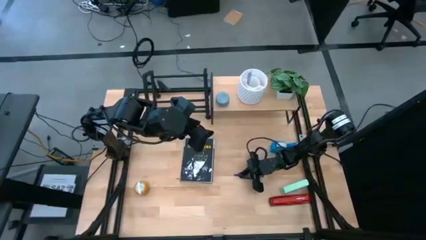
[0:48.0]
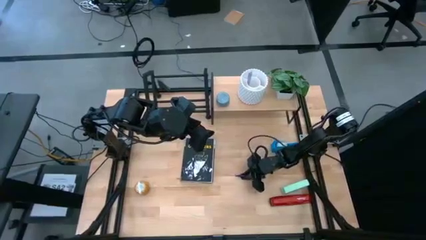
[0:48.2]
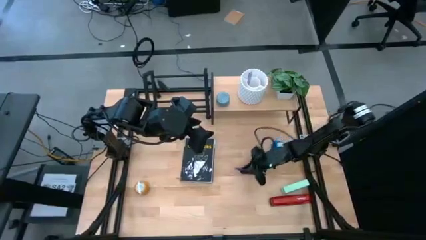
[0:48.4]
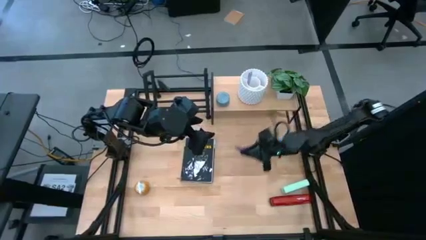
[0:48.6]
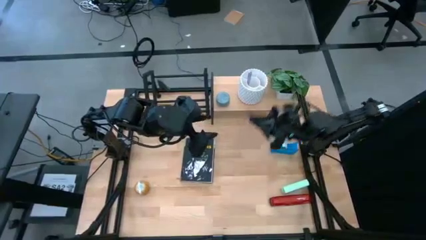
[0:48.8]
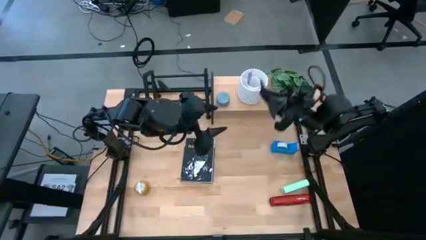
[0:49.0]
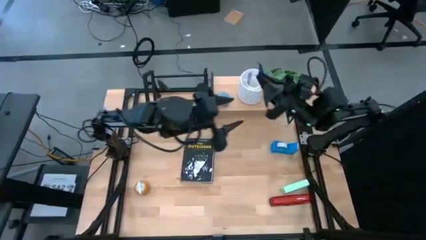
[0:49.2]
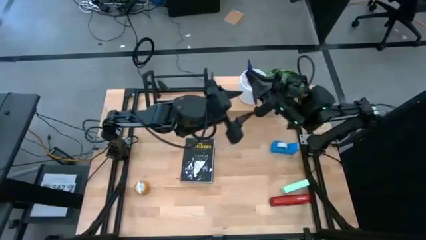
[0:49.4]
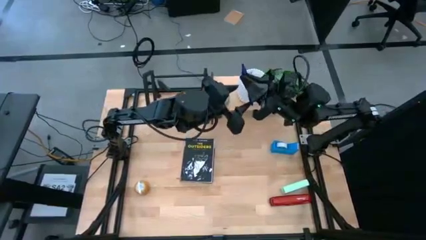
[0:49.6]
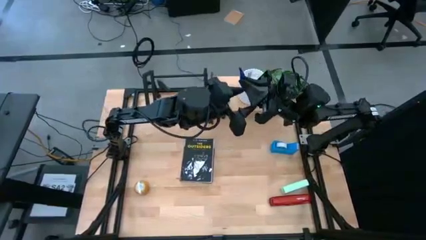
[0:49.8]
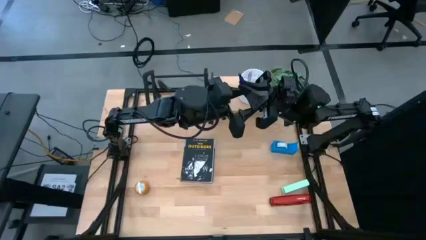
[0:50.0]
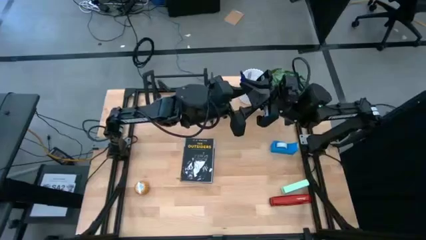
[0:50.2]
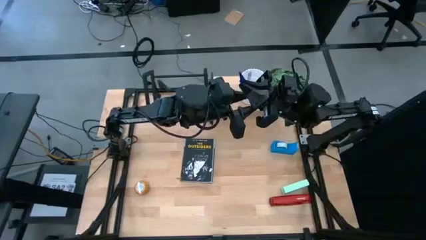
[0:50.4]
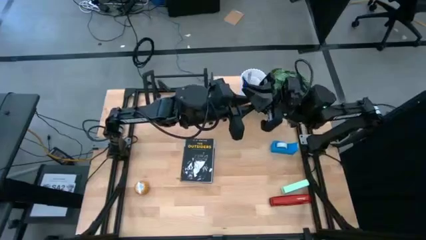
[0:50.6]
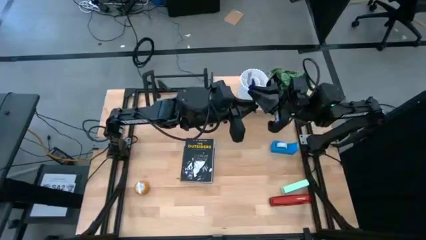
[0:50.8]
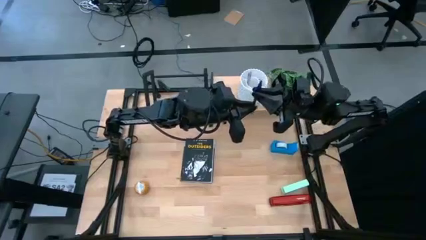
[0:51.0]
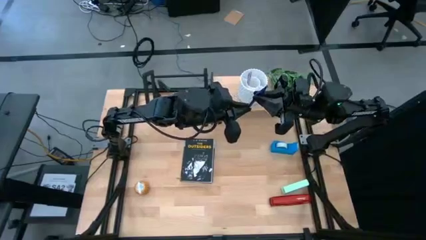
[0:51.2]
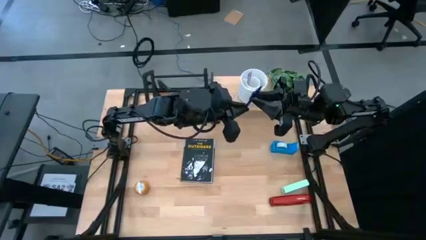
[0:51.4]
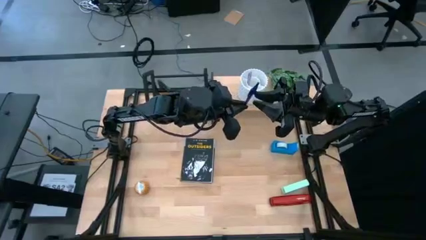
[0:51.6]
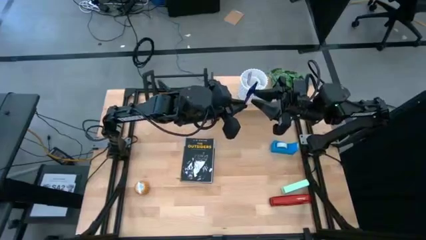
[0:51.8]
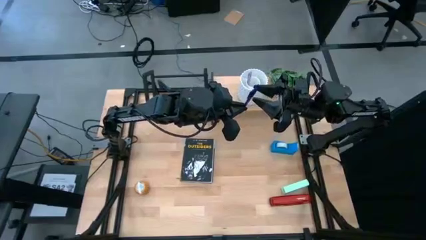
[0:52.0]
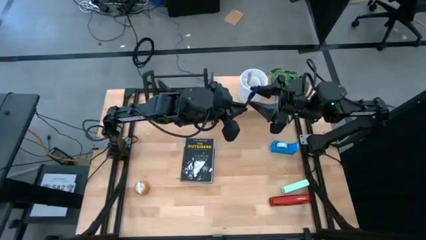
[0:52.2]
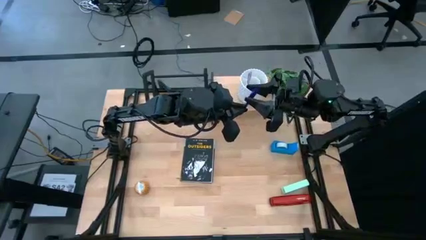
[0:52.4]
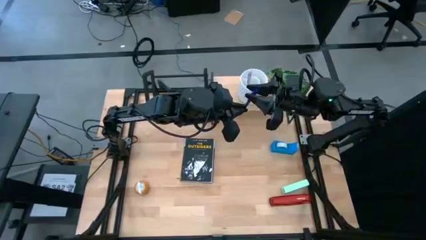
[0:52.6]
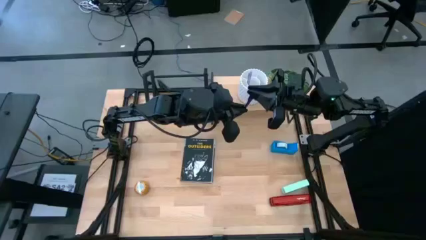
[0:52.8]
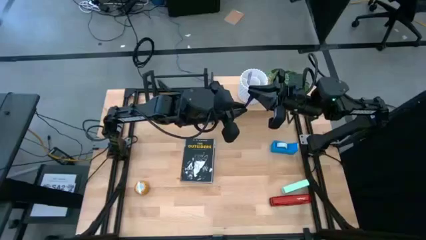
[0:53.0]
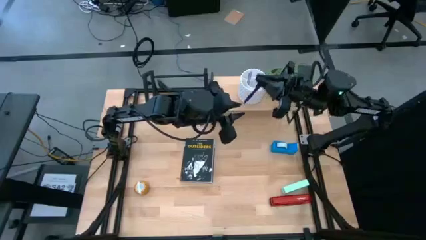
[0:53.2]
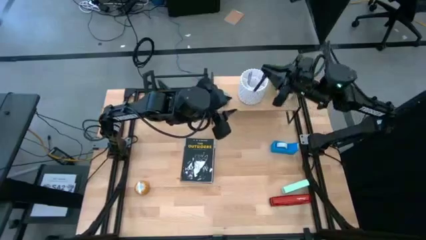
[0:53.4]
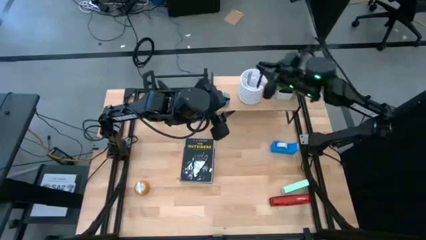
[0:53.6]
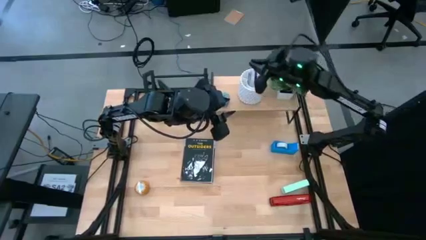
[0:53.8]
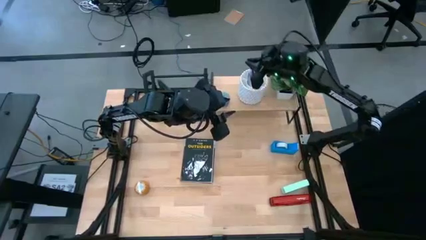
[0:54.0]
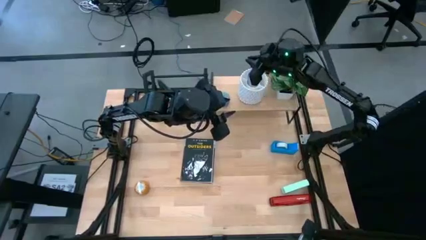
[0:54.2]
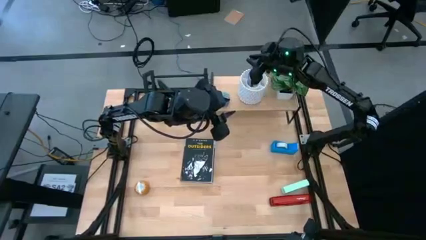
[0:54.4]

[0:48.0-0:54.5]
Task: Stock shelves
Put the violet pen into the white pen holder on the shelf

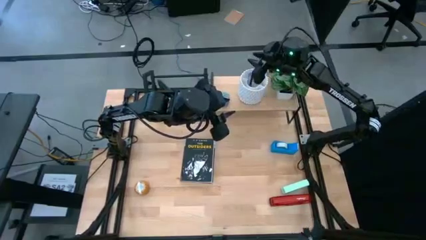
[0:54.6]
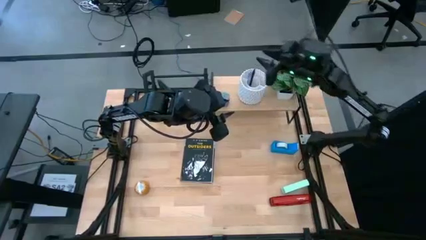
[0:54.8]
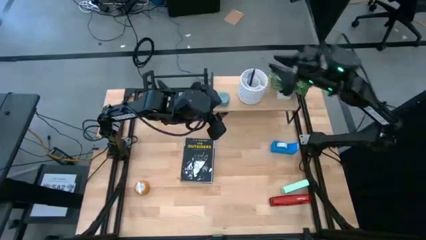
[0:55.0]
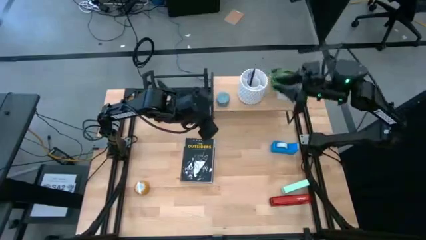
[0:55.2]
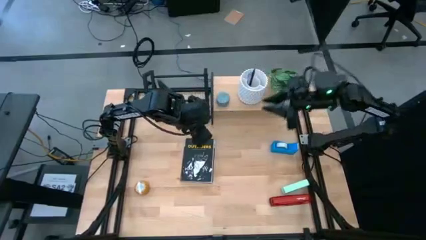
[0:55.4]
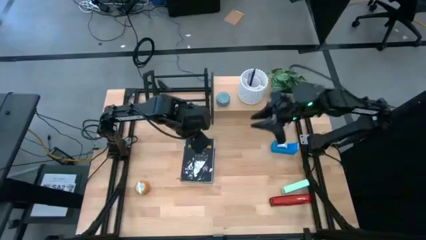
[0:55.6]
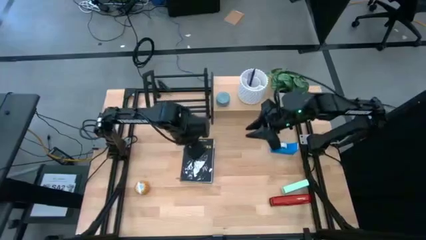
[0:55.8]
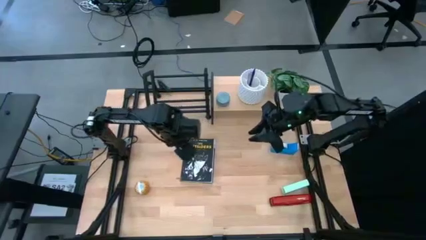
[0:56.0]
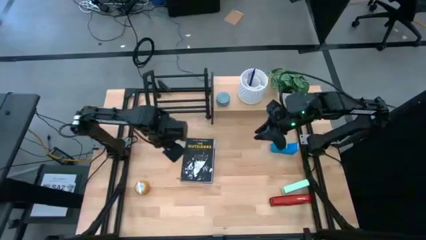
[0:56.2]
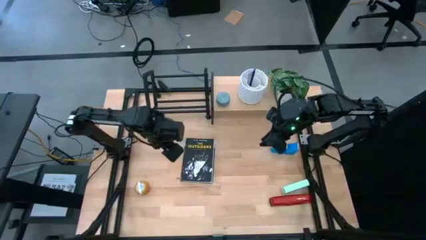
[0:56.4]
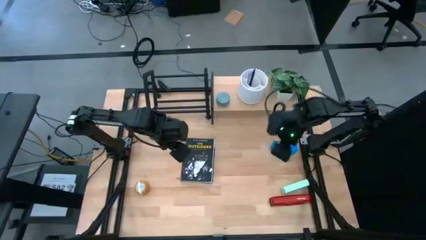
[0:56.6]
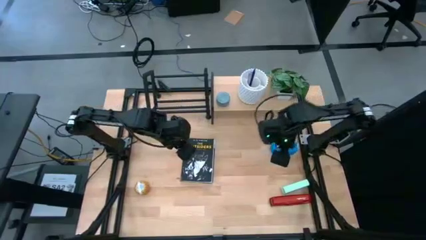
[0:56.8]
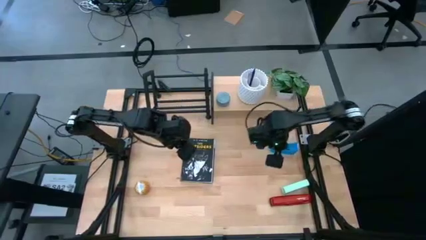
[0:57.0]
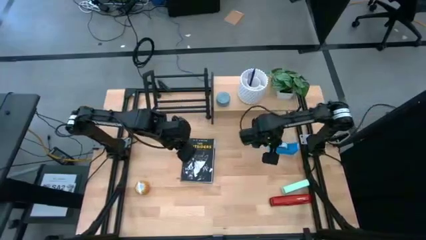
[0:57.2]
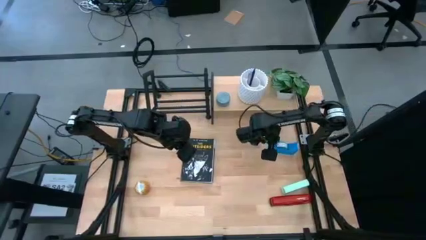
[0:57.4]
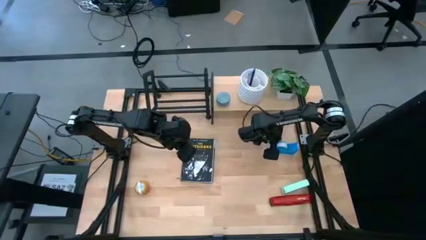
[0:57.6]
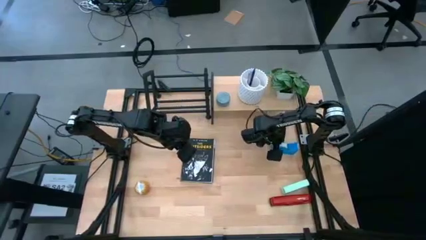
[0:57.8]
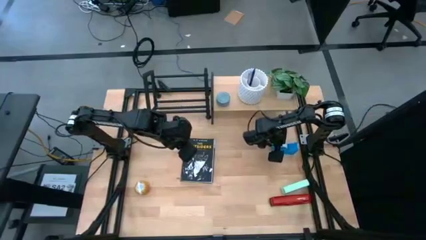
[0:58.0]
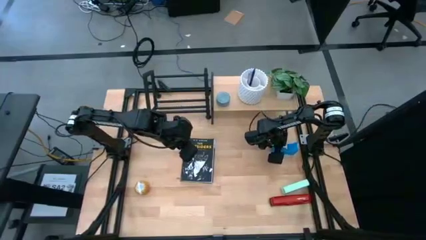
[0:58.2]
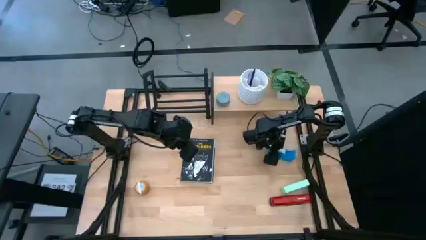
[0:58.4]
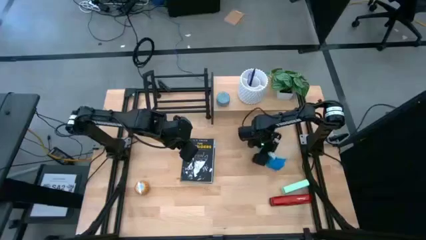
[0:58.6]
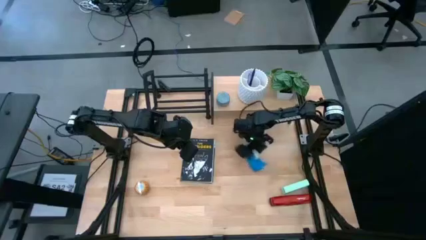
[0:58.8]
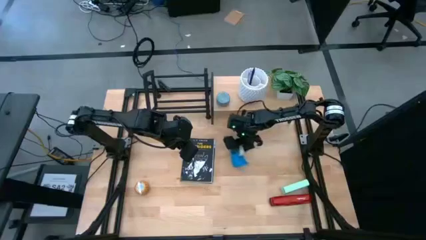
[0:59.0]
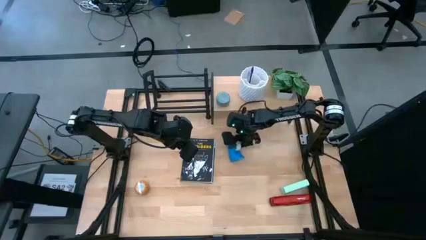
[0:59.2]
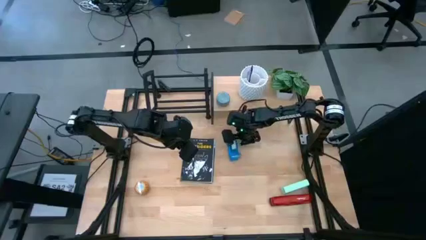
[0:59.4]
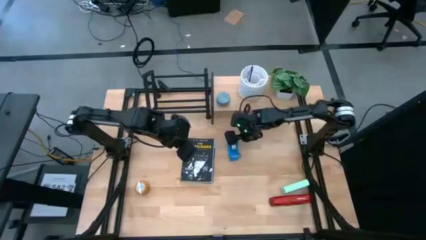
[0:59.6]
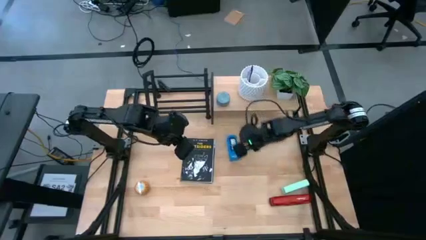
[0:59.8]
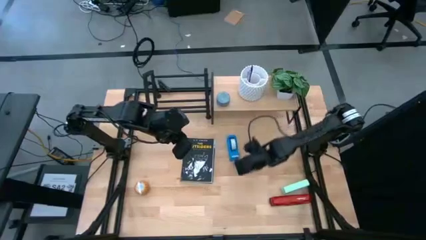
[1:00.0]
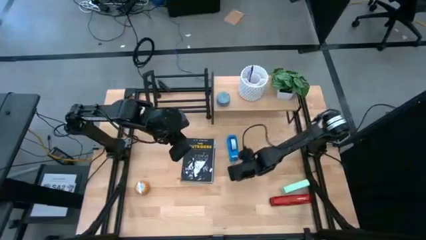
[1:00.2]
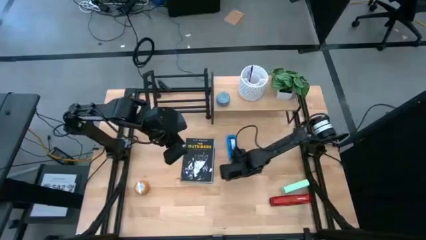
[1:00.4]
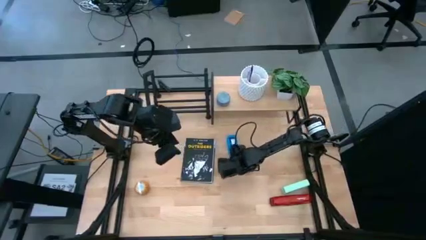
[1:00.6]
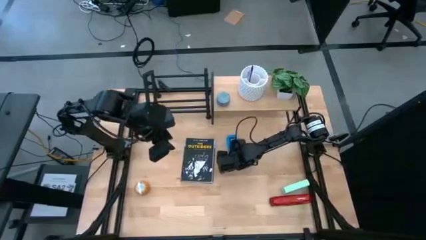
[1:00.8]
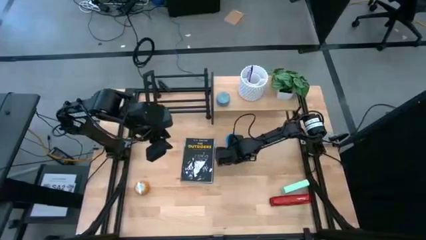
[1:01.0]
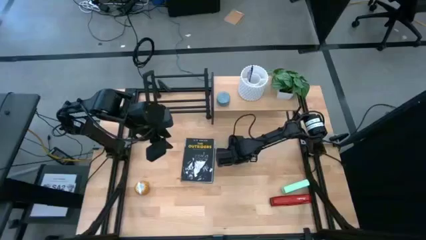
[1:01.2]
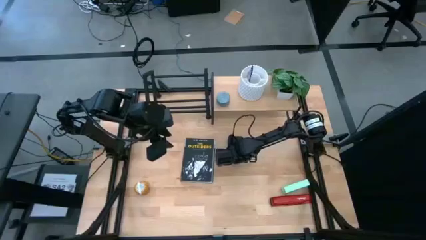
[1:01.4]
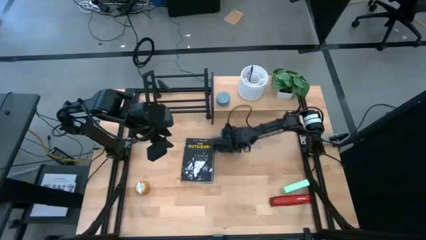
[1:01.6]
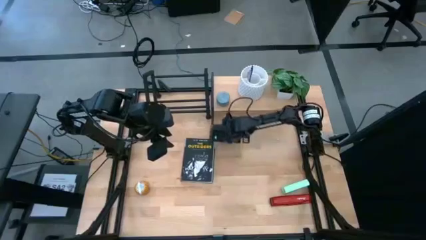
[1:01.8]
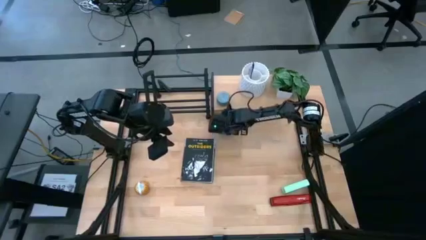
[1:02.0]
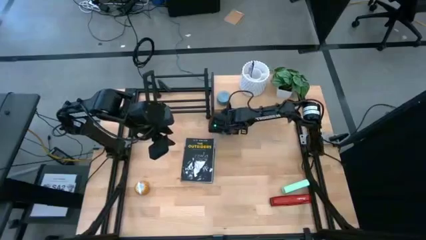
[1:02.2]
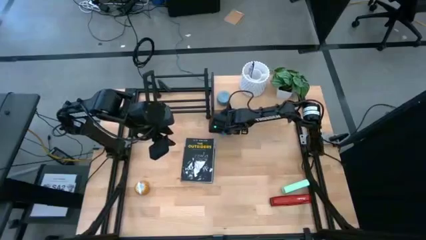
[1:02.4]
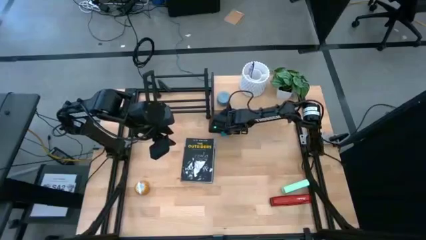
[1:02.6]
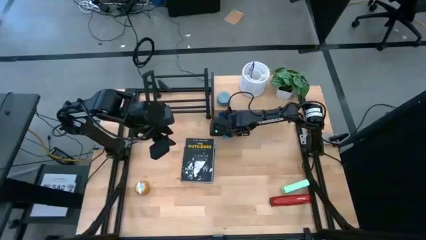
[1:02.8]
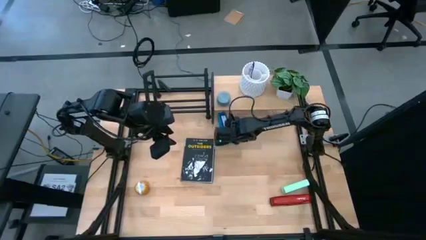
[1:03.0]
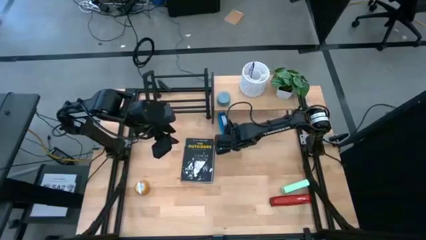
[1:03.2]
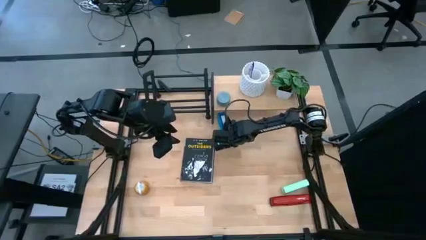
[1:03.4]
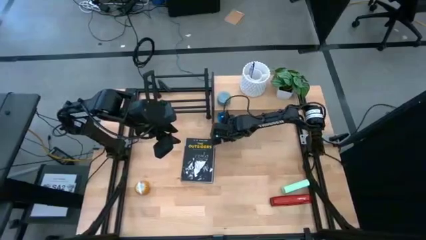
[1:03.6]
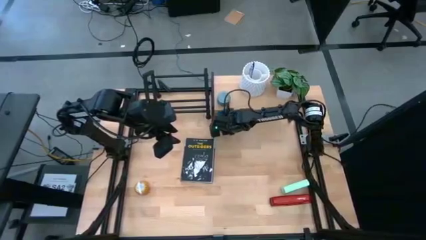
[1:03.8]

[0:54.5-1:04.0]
Put the blue tape dispenser under the shelf
